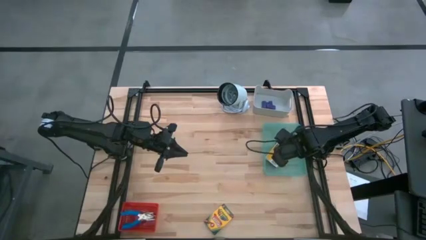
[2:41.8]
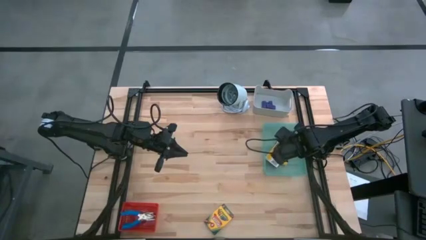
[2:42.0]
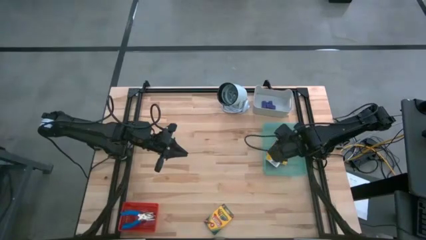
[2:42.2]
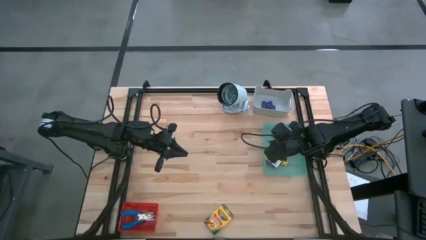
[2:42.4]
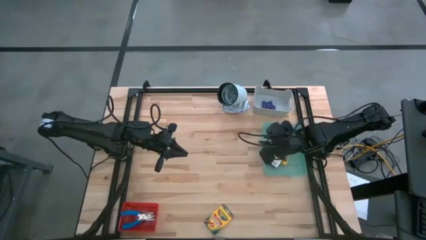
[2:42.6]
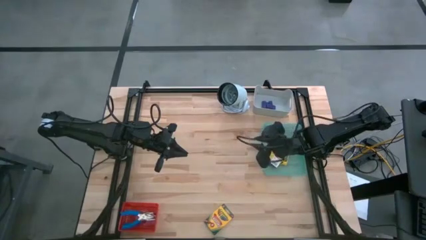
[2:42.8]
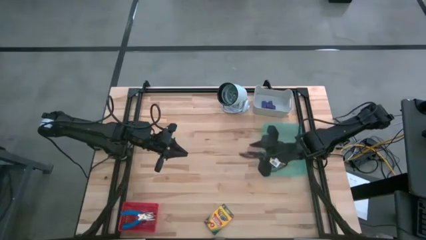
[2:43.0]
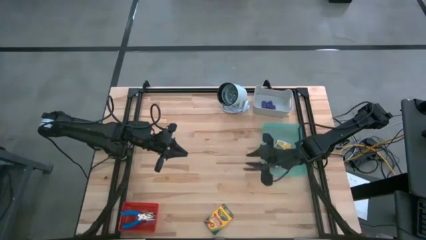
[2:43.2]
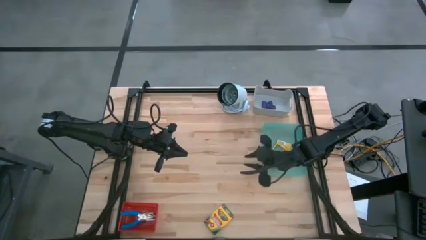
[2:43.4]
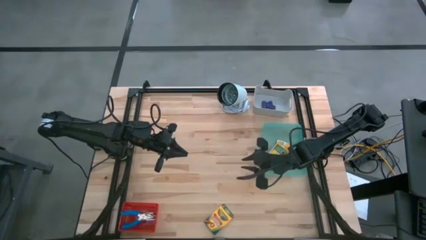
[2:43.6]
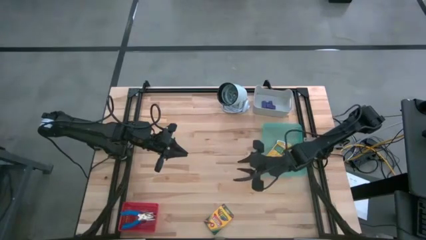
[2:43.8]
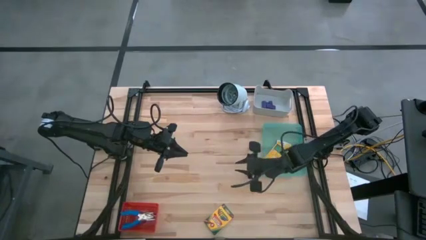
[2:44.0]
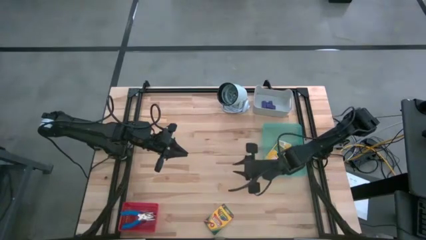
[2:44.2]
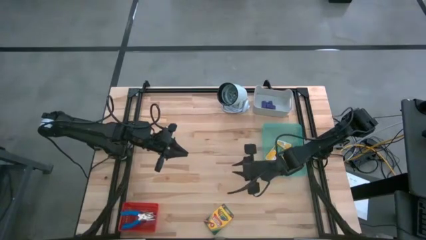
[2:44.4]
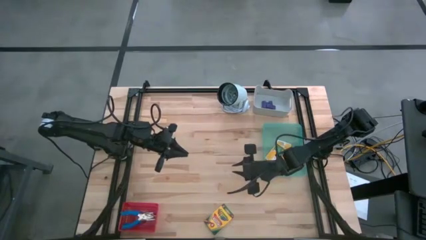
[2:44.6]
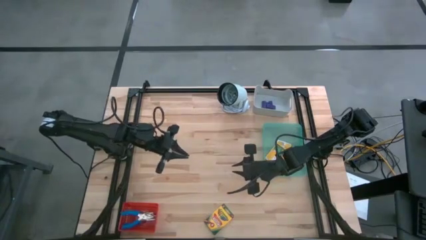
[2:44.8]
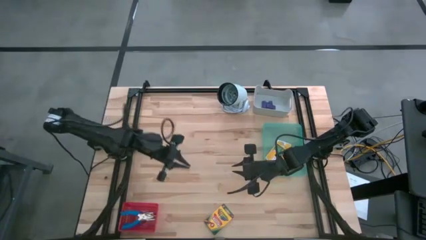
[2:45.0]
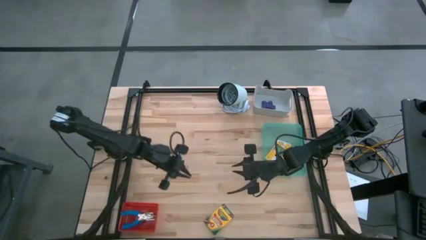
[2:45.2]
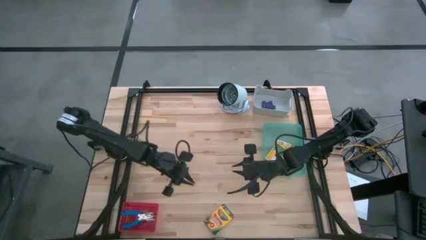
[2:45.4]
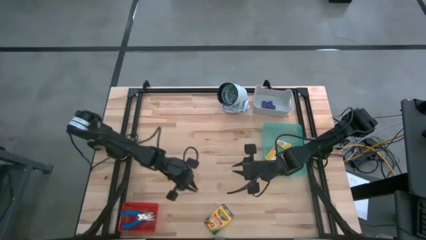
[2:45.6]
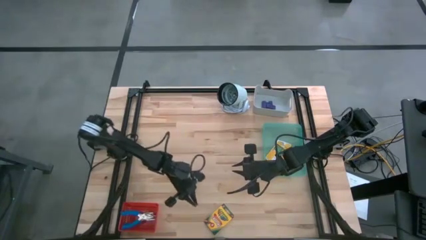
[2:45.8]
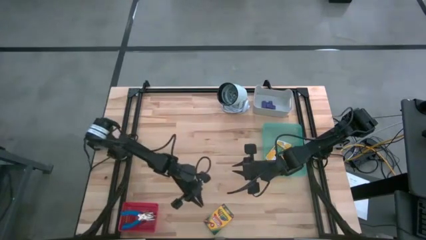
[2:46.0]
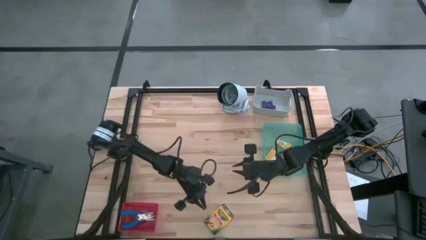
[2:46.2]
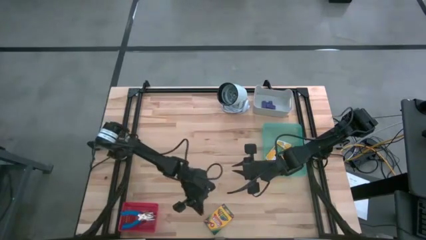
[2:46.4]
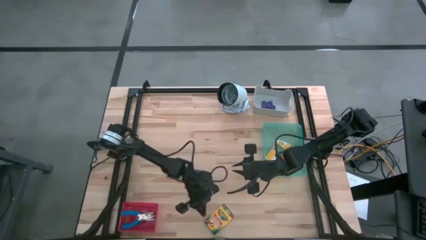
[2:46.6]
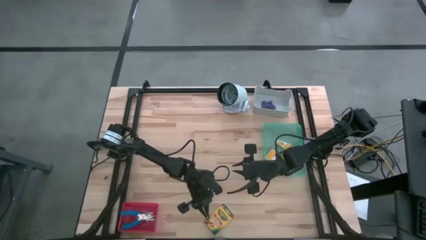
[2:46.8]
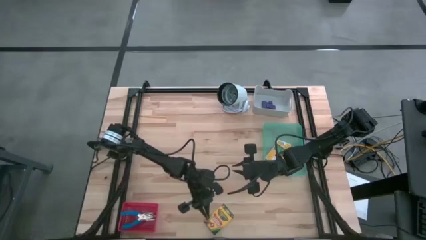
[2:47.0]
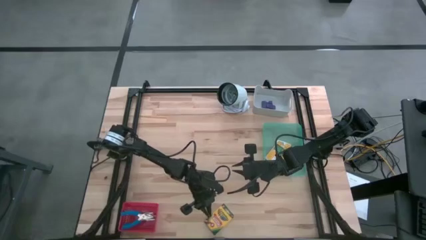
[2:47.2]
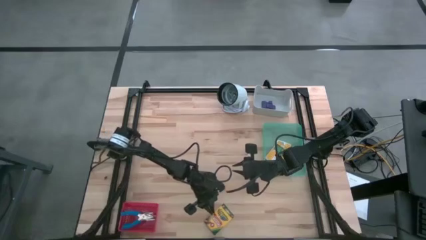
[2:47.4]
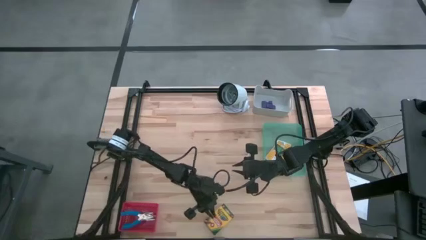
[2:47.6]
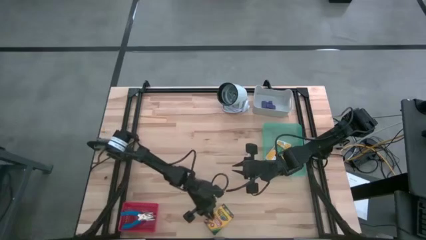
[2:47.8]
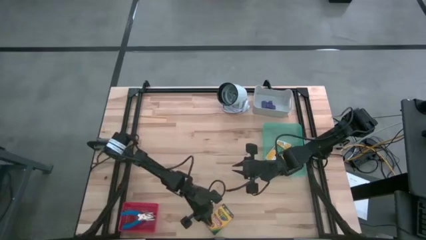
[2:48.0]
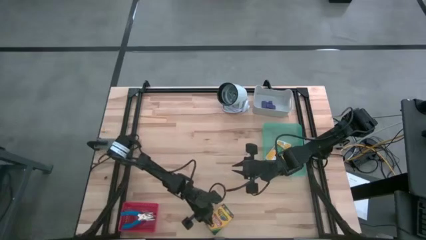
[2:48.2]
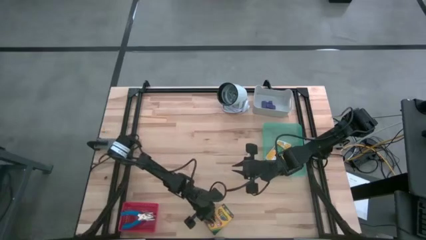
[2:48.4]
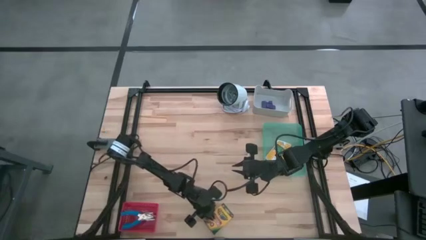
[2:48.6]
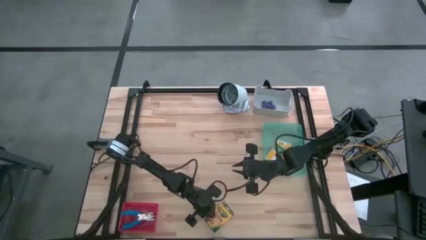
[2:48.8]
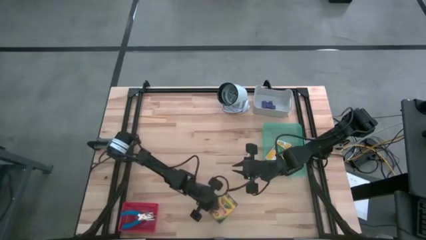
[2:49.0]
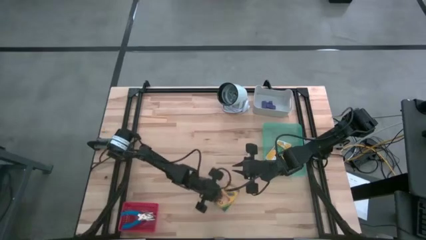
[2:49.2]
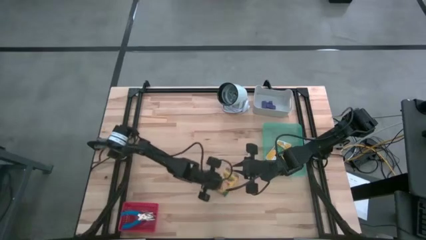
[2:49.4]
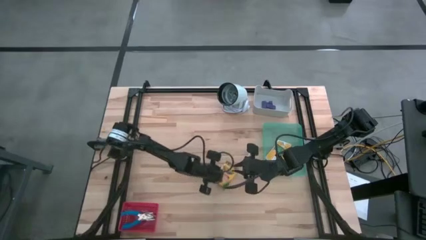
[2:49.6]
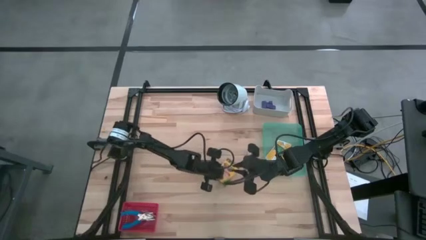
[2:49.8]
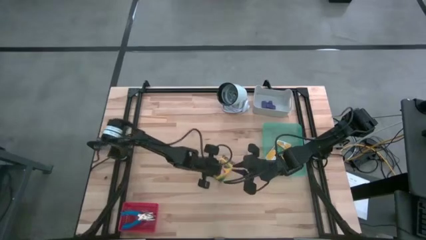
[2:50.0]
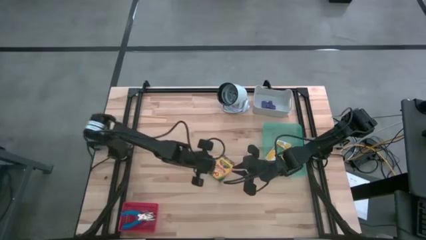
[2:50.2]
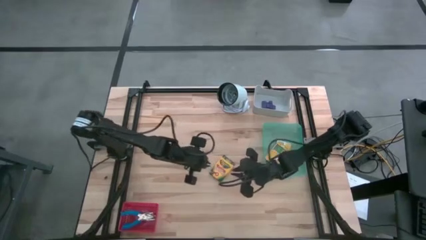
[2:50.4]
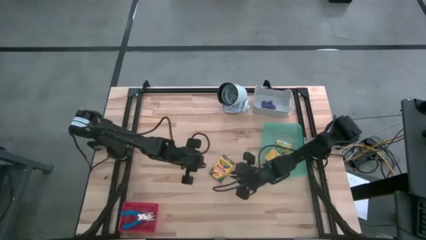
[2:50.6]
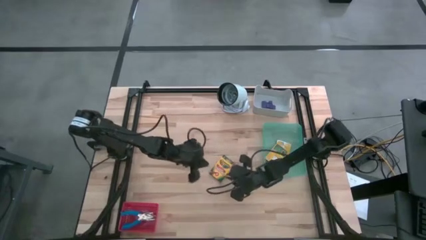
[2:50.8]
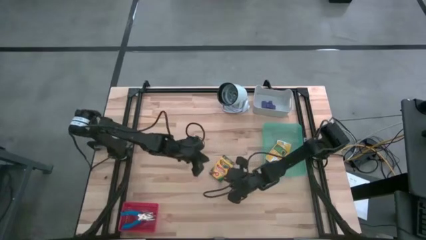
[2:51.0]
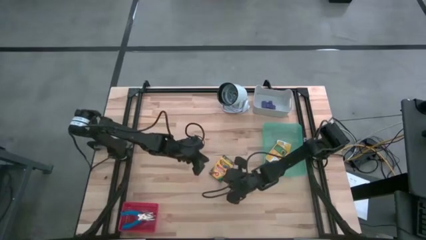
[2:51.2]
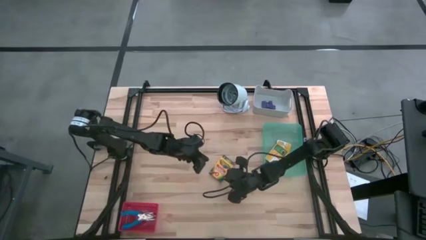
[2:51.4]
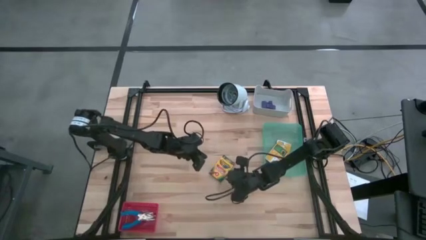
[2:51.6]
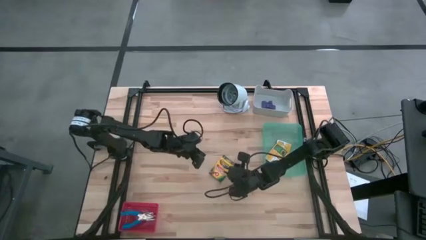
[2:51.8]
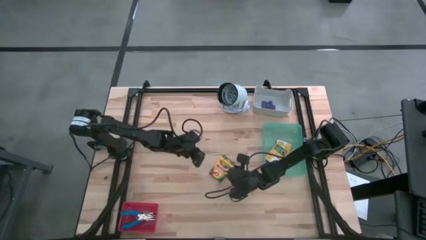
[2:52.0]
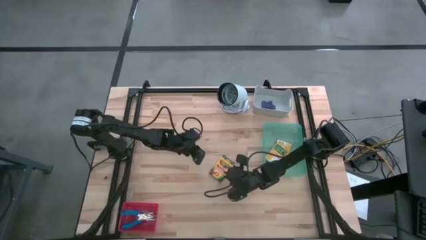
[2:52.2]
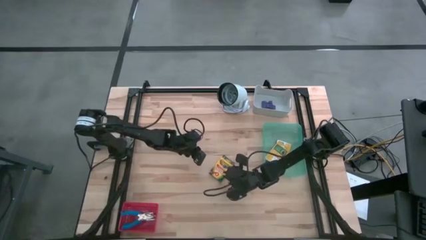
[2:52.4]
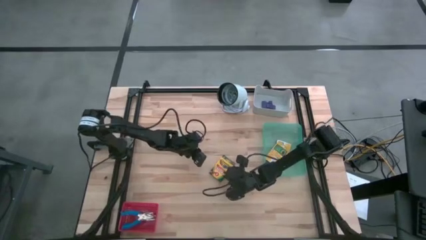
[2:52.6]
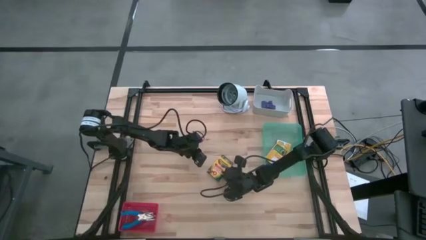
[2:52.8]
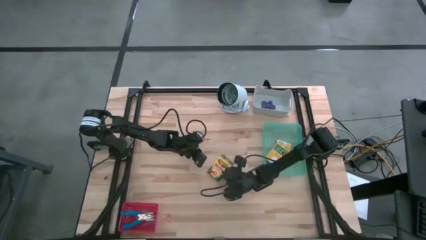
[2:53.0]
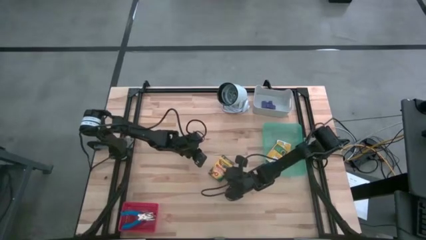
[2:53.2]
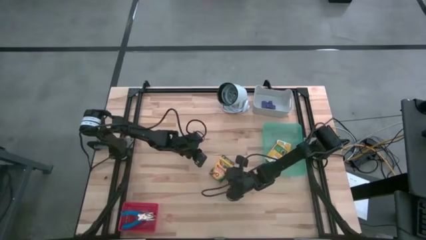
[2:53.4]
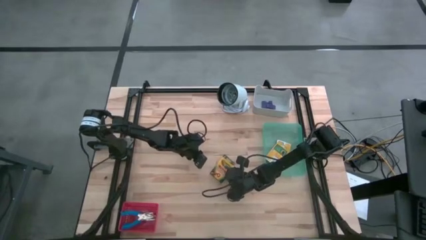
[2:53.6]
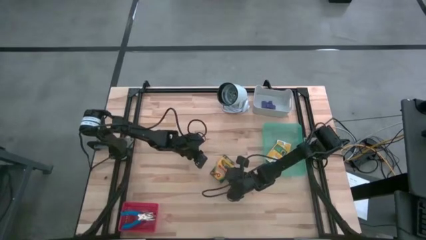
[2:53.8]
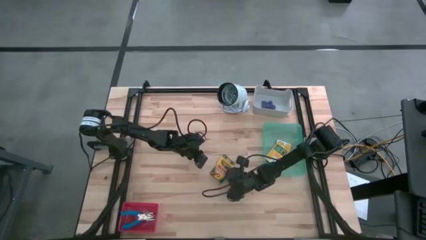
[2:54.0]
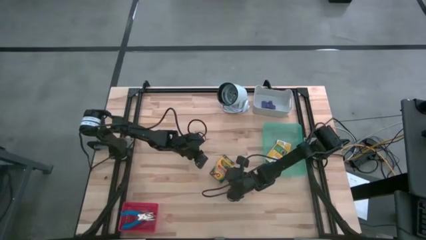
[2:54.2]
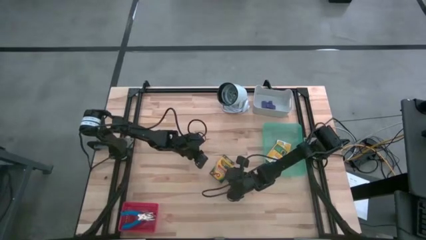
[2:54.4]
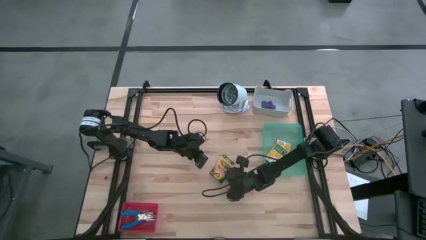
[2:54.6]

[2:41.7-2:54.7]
Task: Pick & Place School Supplies
Put the crayon box into the green bin

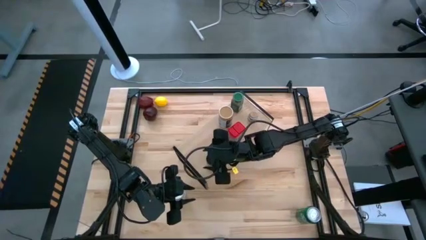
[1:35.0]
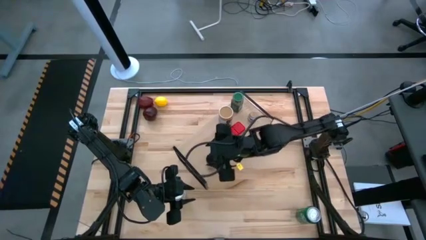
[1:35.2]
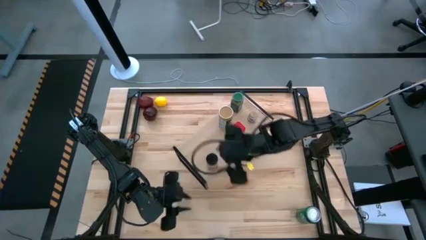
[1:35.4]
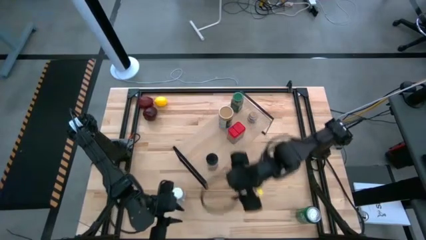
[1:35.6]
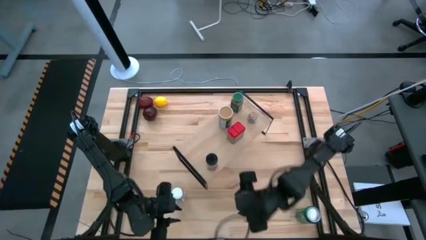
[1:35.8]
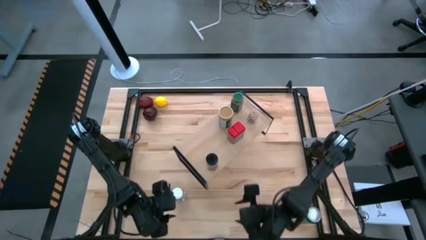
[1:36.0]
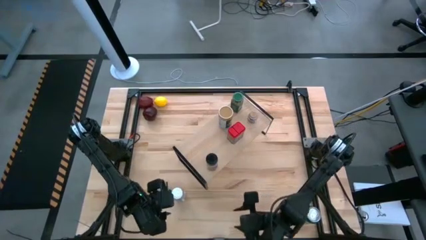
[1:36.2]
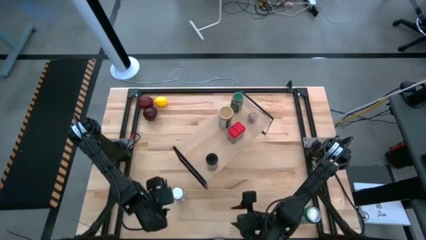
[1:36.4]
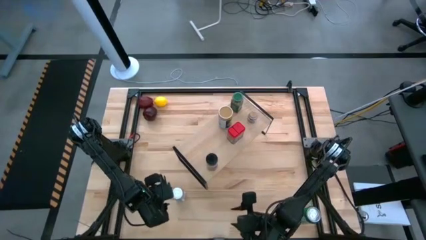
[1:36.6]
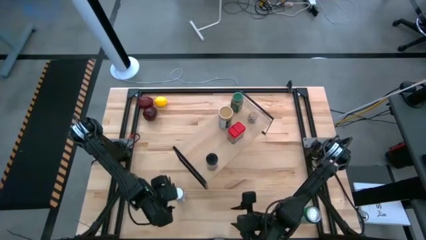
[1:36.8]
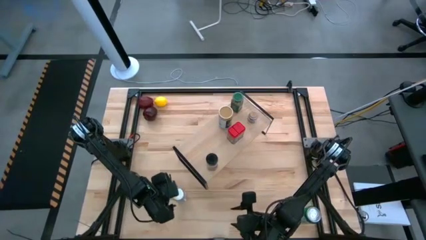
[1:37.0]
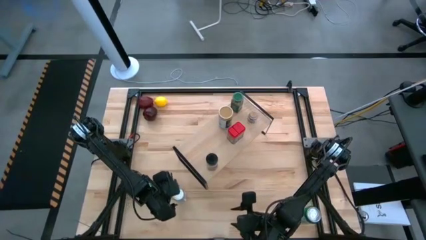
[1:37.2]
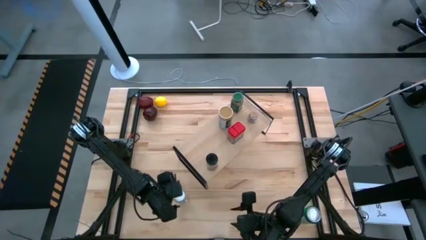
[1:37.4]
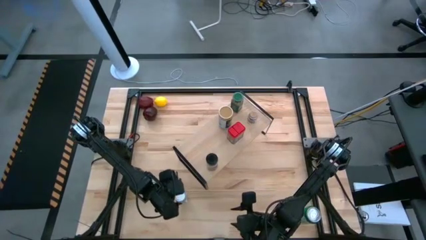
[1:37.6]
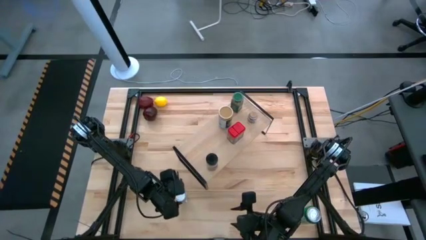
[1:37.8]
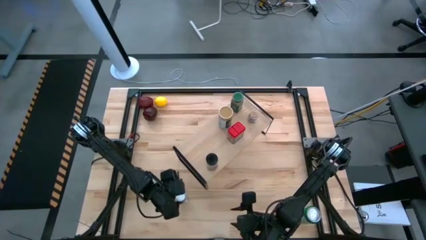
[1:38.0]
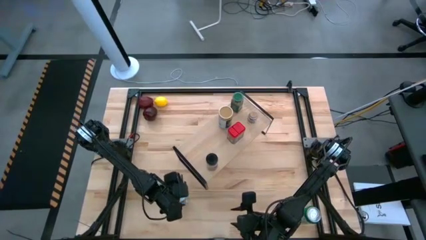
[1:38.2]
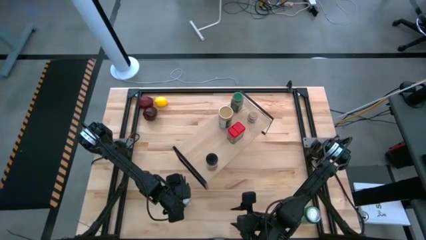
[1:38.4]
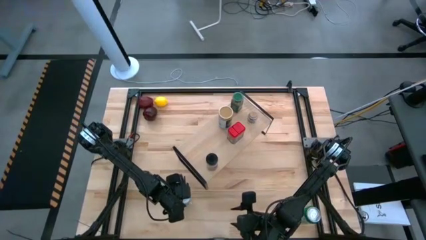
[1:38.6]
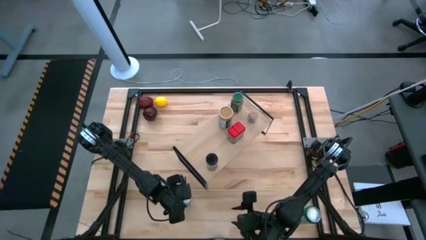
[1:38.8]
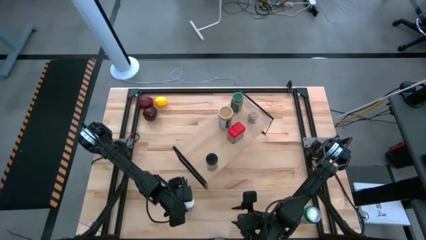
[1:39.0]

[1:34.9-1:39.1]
Task: Shelf spices
Put the white seasoning bottle on the shelf
